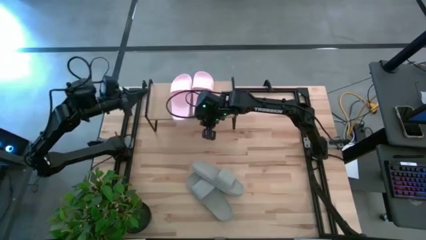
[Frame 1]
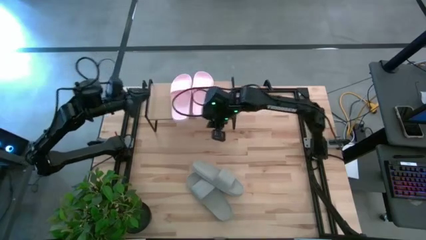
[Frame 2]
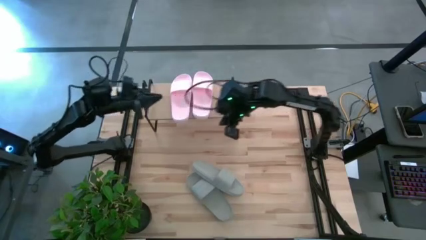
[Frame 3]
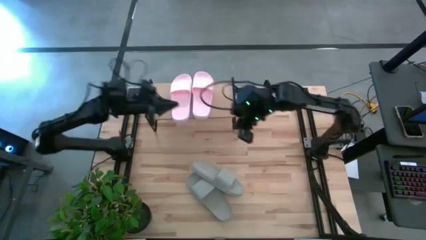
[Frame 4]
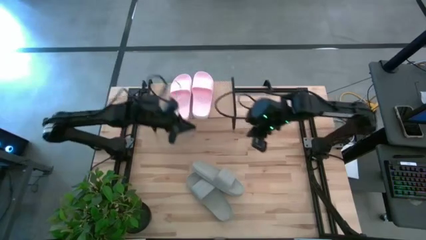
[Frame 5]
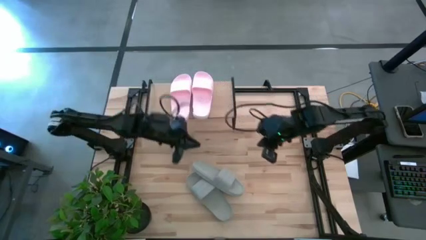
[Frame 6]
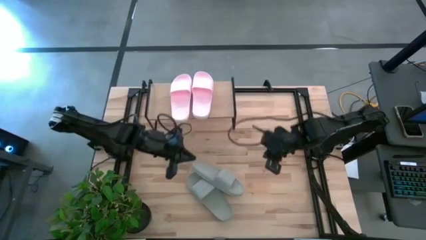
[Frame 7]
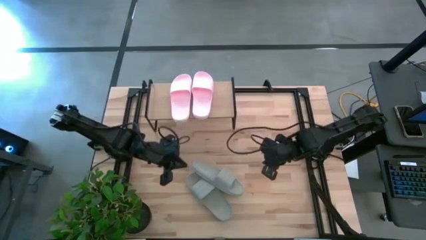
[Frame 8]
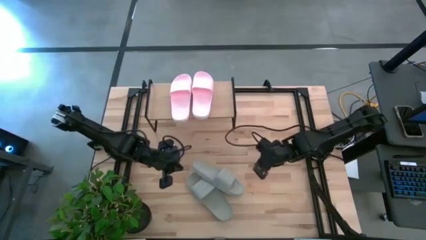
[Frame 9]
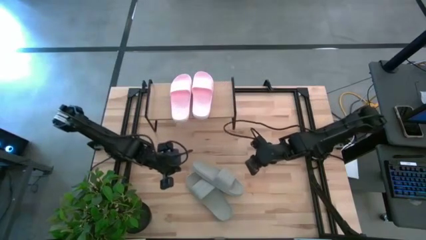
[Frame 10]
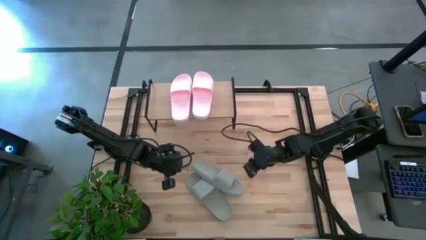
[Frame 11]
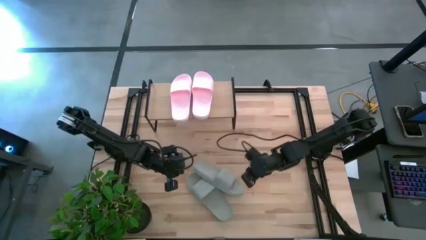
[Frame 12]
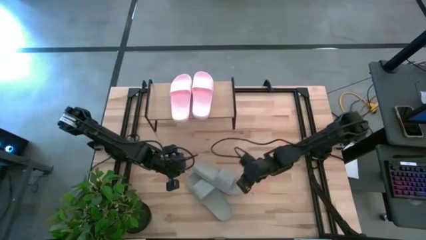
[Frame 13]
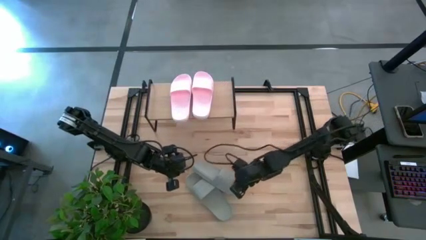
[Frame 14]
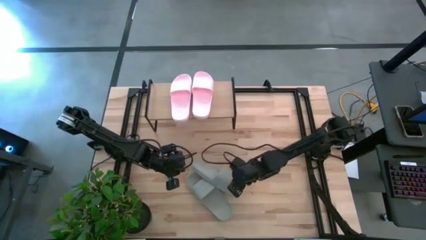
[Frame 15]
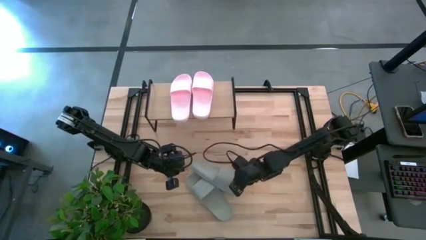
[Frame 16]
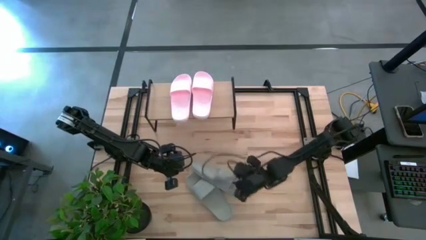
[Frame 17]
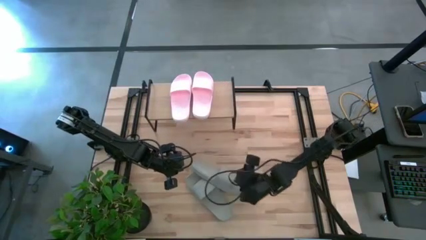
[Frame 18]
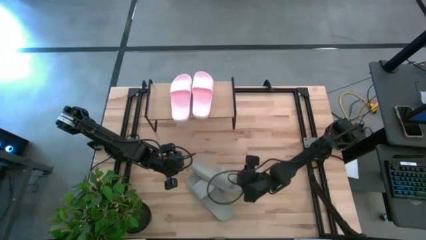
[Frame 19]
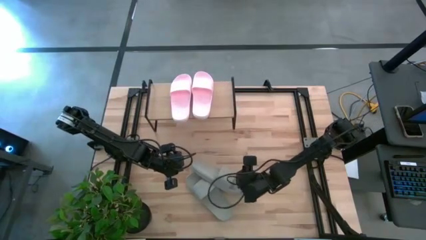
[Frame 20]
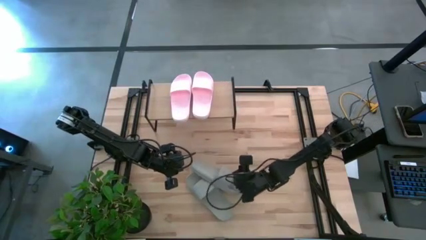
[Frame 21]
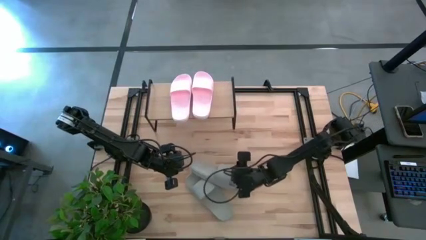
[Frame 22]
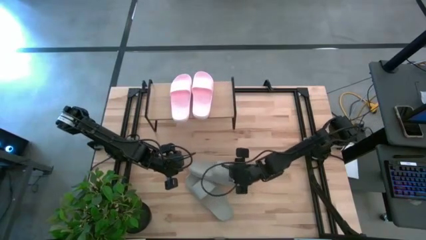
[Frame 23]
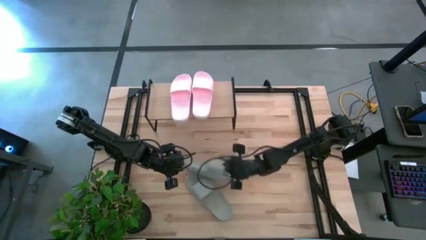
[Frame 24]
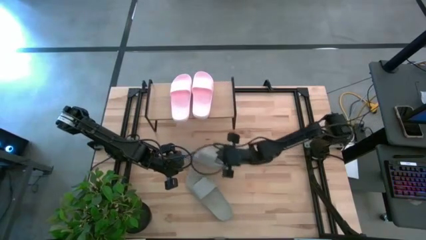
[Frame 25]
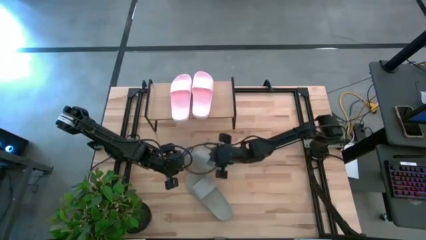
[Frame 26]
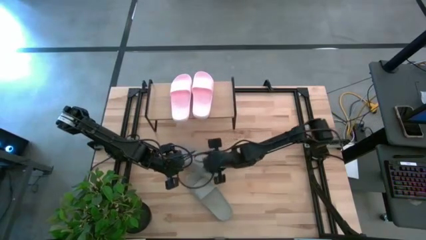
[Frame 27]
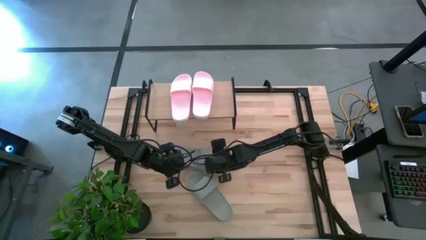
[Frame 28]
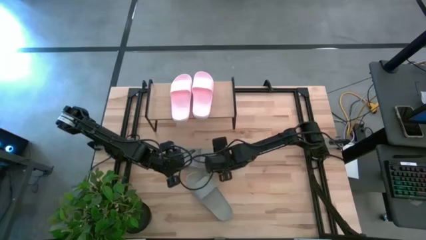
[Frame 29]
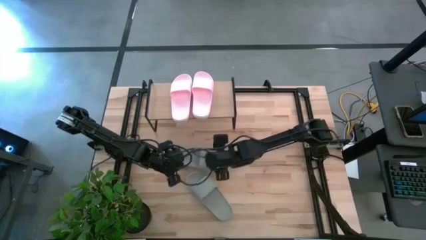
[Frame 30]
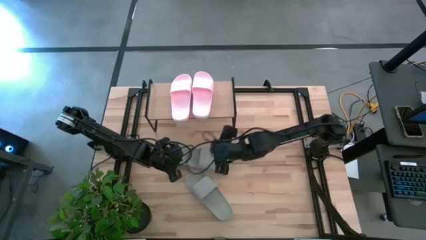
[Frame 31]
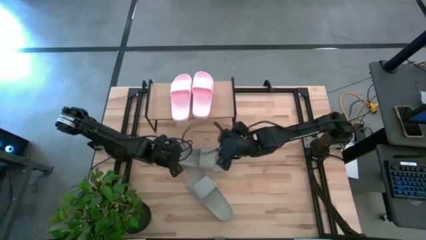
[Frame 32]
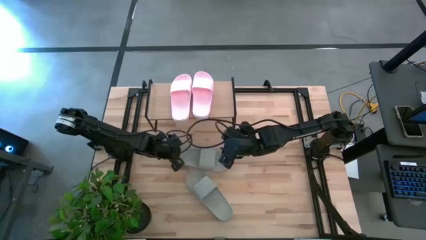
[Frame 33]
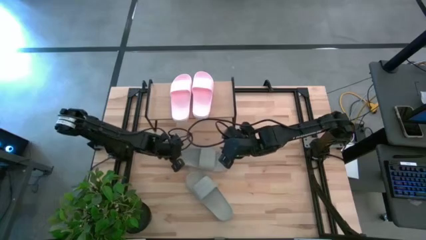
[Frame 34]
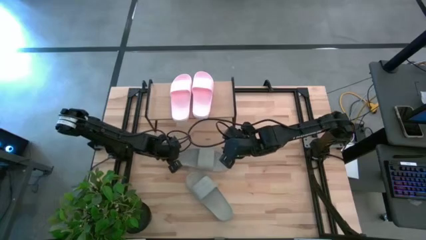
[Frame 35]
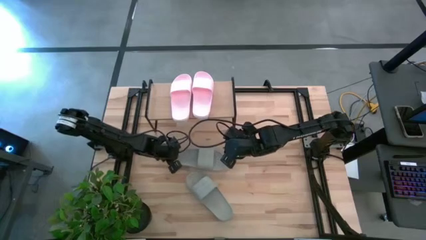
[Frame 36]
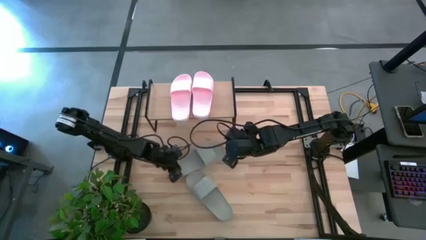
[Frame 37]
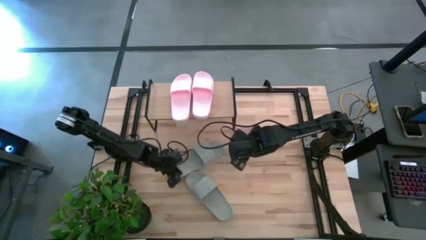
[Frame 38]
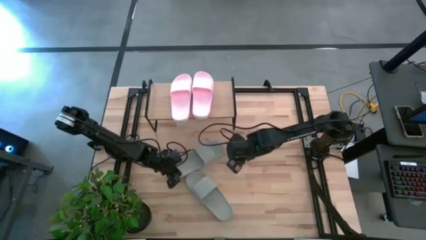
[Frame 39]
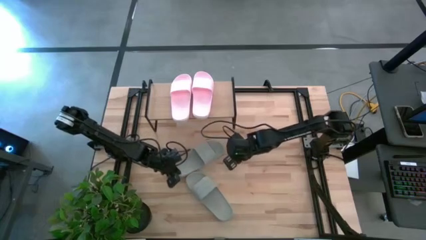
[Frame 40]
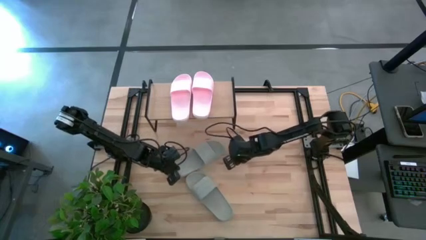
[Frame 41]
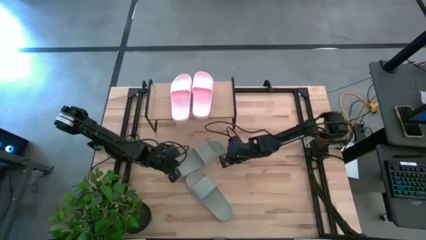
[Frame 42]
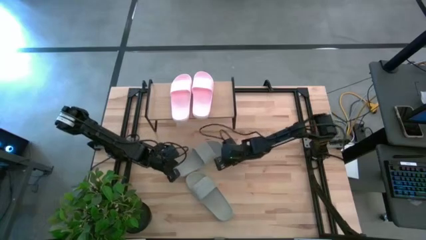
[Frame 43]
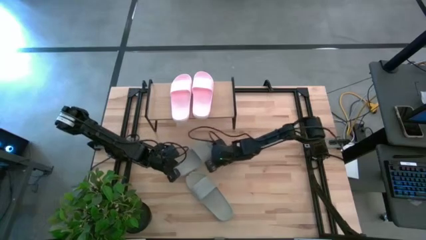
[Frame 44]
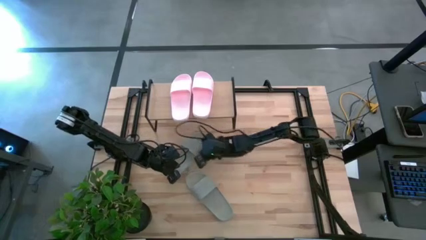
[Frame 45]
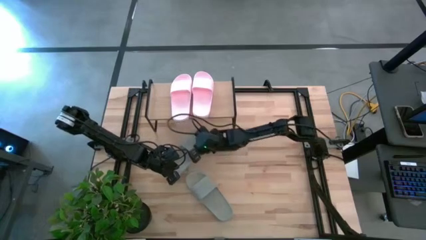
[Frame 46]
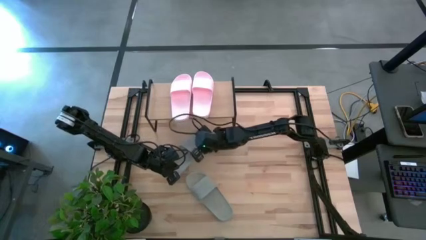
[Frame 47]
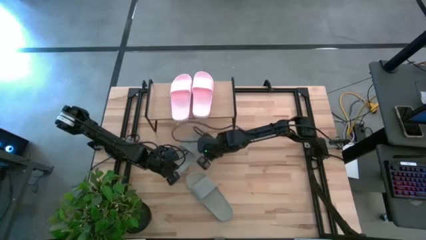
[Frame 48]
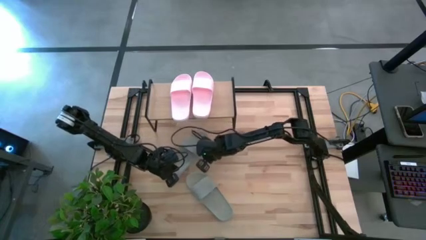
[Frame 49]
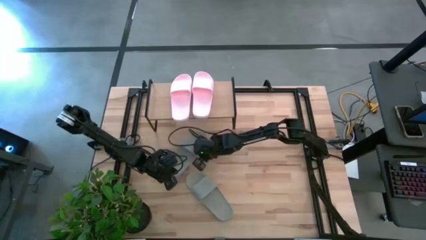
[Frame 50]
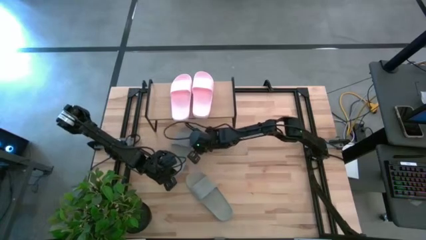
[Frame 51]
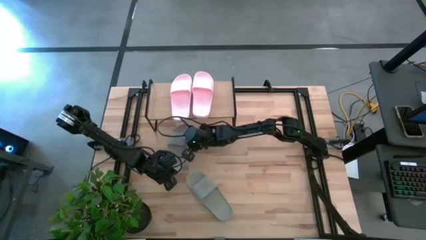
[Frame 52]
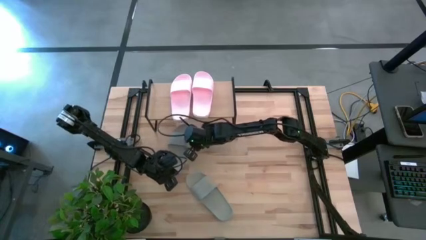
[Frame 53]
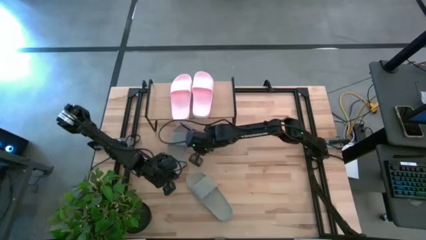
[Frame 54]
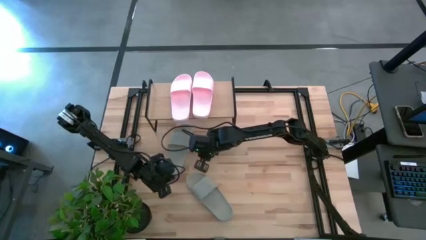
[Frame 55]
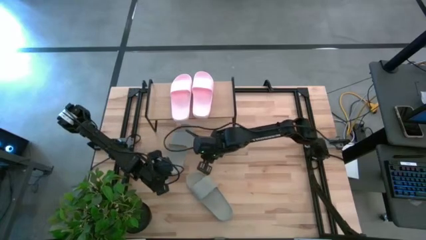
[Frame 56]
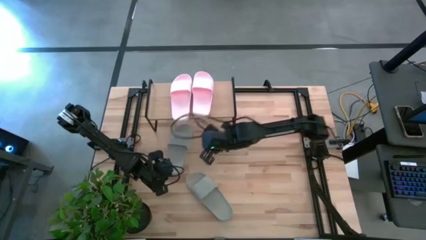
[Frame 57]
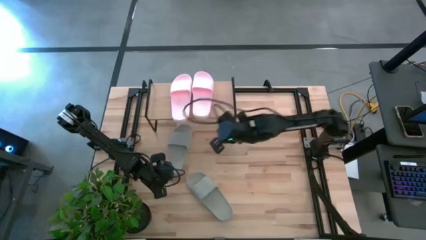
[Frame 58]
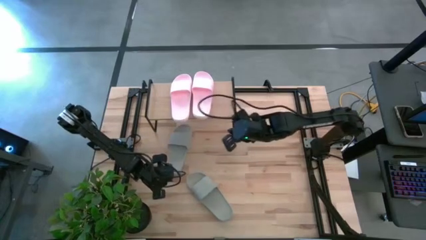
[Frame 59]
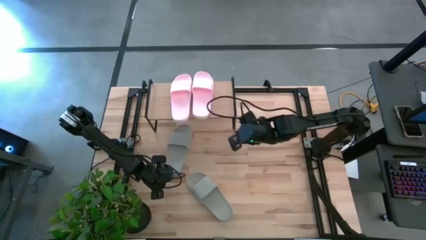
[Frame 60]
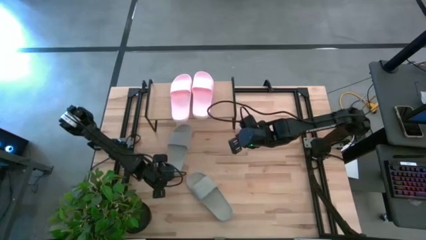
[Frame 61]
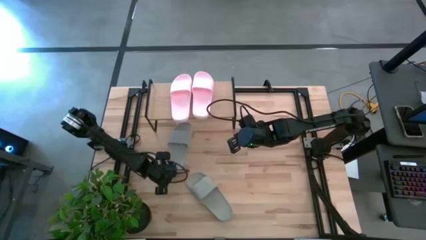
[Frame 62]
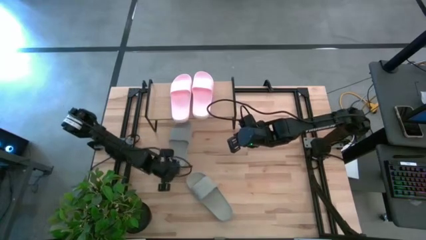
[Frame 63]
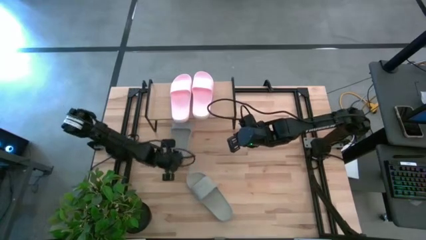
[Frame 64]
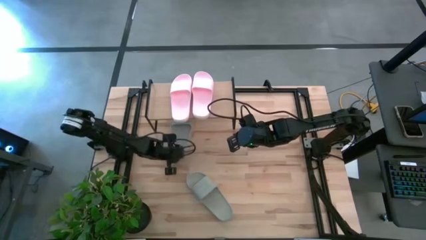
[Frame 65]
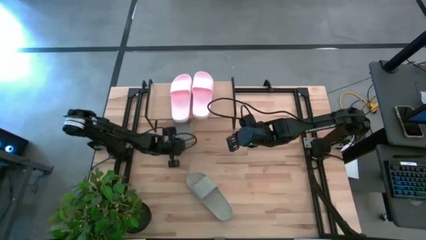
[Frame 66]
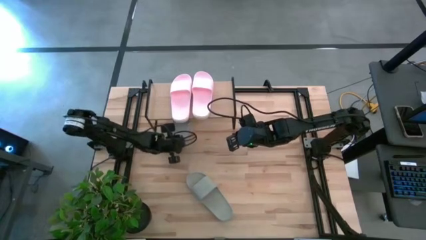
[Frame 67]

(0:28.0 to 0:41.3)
Task: Pick and place slides into the shelf
Put the top gray slipper under the shelf

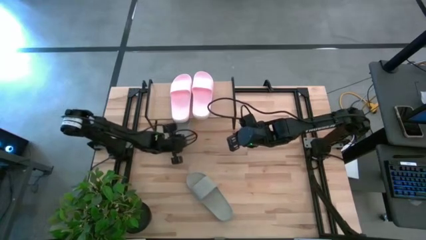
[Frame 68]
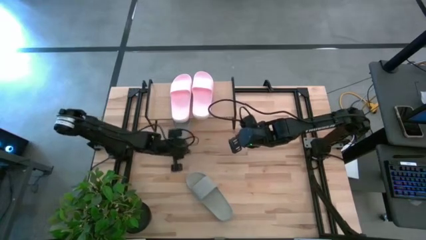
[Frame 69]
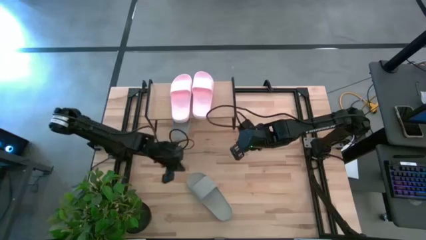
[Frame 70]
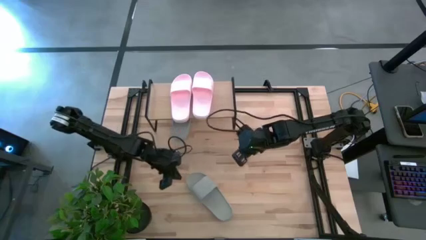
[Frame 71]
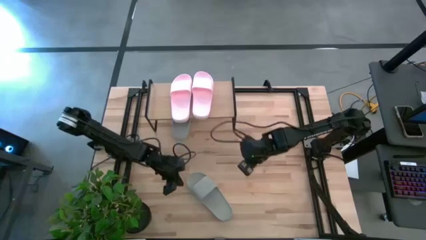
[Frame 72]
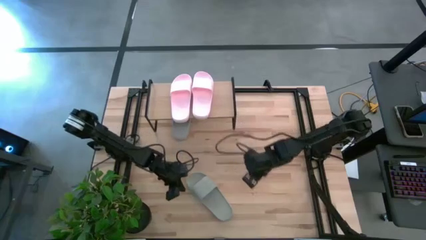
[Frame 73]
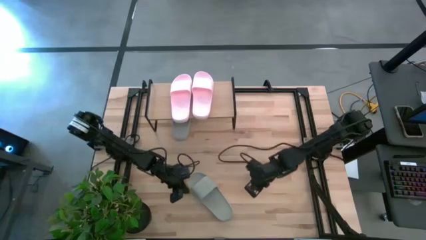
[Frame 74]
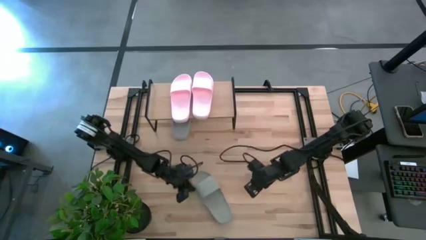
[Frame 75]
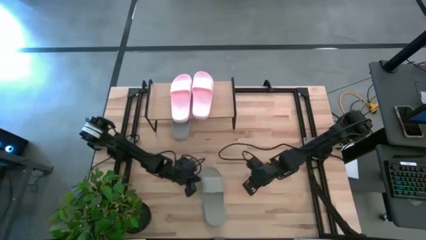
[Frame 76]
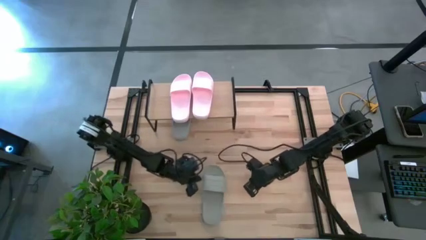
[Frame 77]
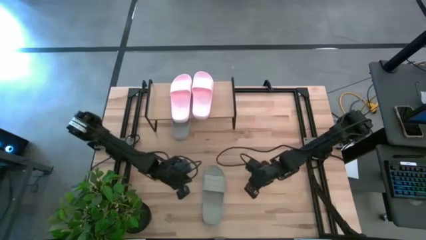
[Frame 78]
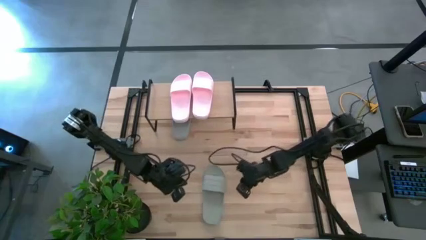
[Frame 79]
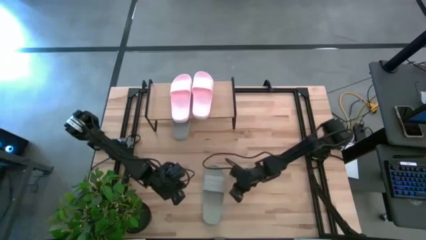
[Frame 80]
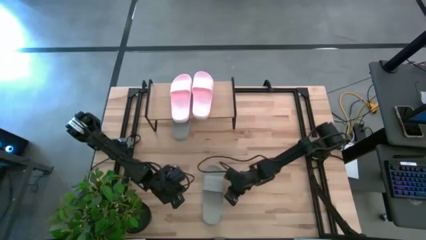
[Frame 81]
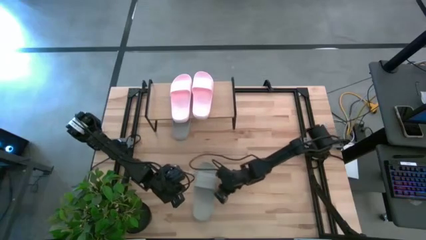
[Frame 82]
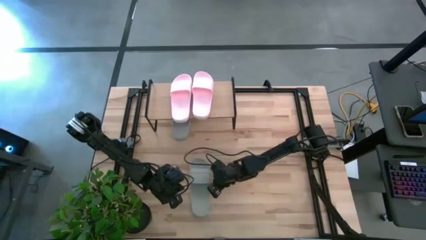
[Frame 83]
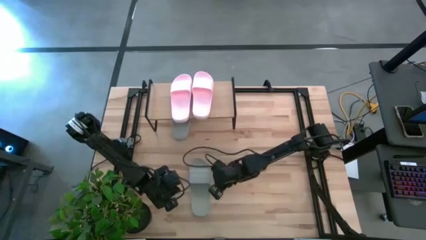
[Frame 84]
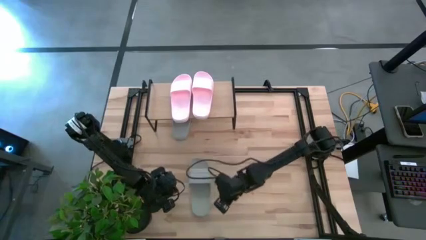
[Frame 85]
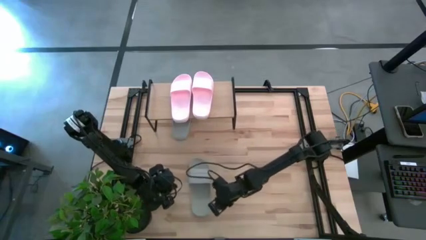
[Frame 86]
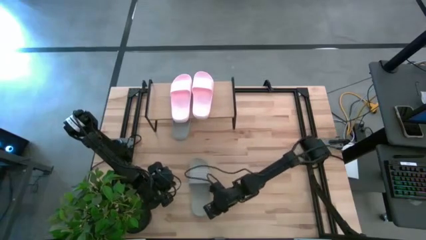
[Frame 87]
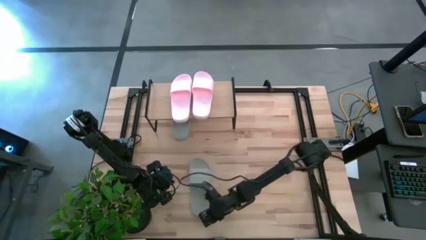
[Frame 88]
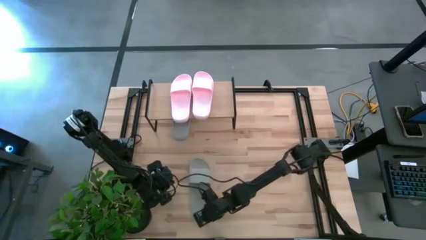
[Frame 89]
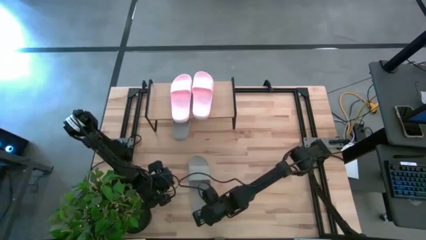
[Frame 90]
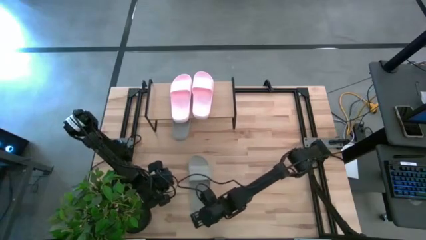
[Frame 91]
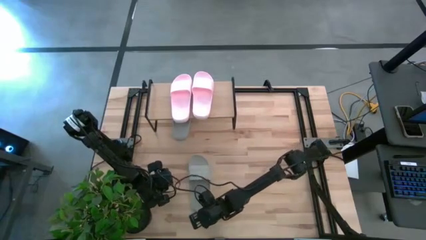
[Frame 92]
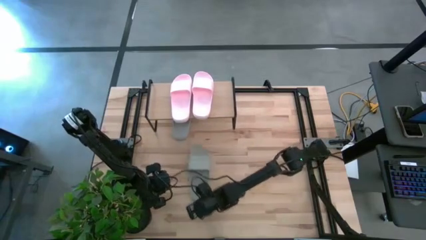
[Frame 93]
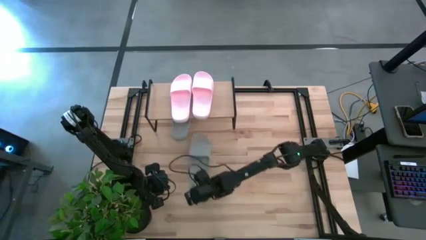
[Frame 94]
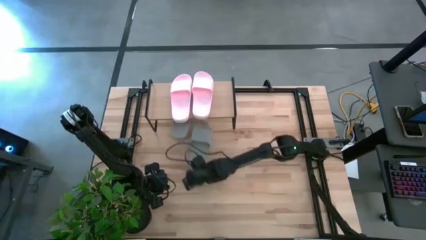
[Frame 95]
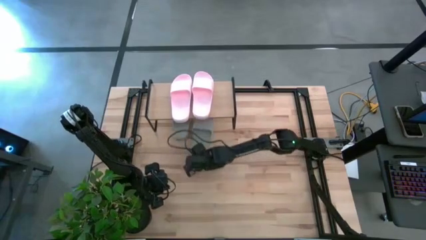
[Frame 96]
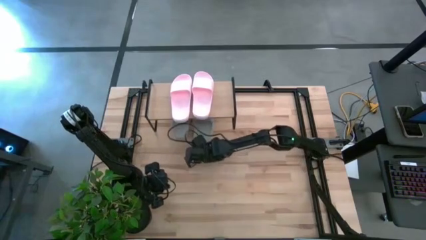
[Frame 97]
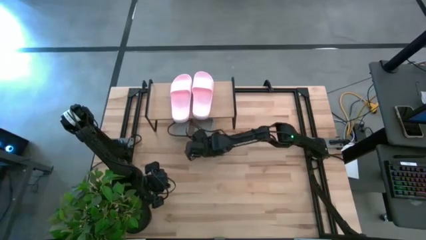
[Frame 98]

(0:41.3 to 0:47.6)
Put the gray slipper under the shelf
